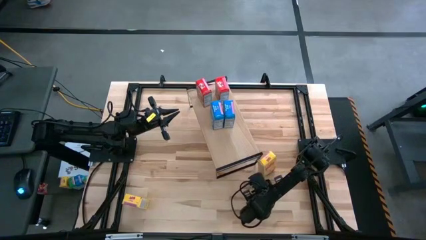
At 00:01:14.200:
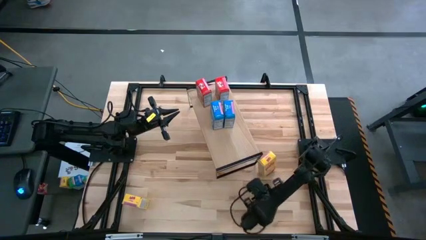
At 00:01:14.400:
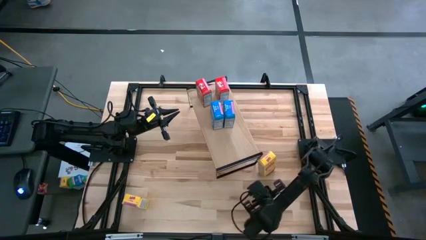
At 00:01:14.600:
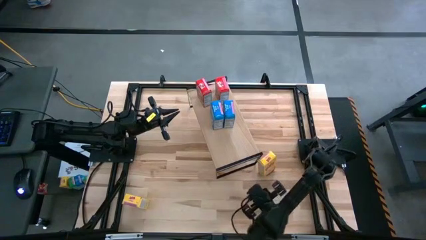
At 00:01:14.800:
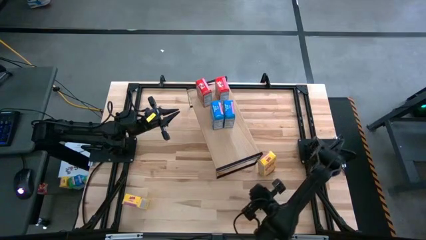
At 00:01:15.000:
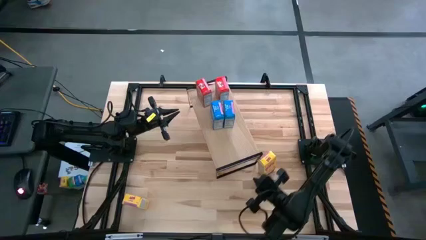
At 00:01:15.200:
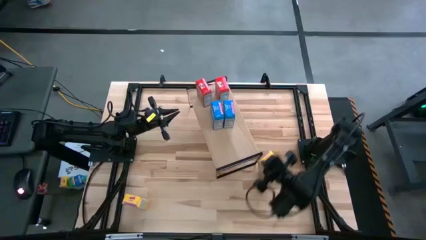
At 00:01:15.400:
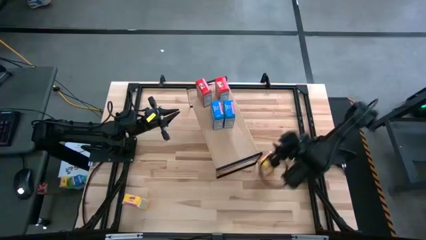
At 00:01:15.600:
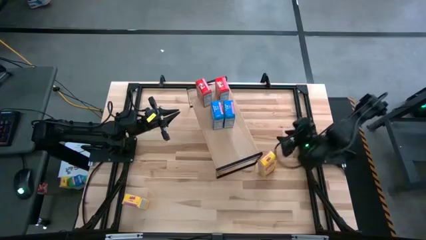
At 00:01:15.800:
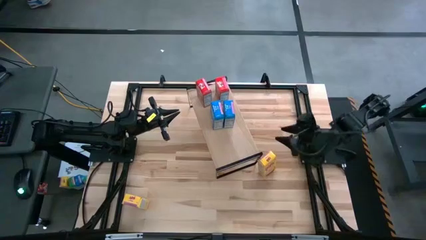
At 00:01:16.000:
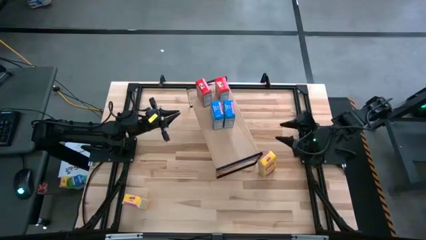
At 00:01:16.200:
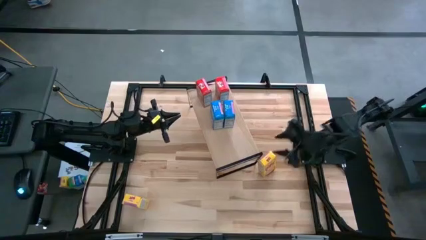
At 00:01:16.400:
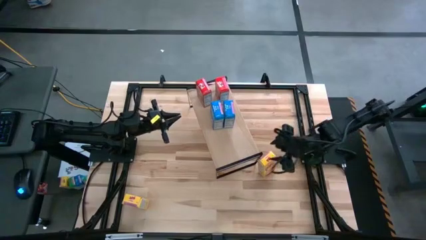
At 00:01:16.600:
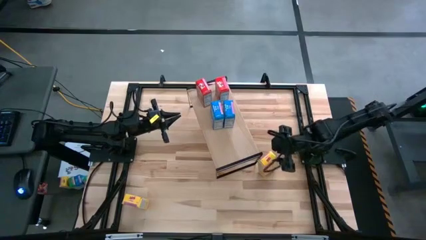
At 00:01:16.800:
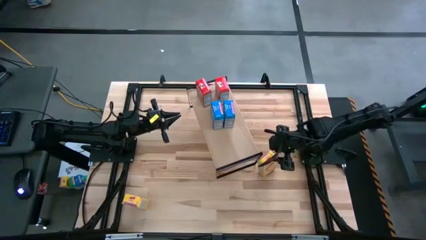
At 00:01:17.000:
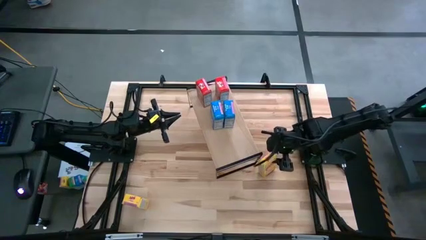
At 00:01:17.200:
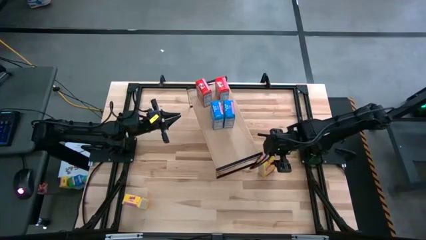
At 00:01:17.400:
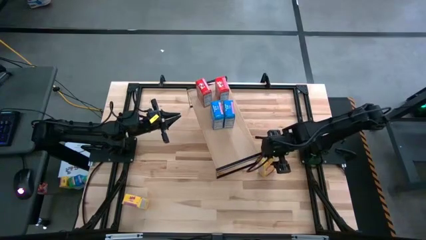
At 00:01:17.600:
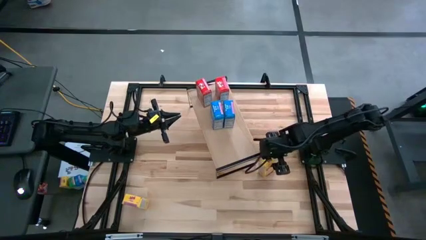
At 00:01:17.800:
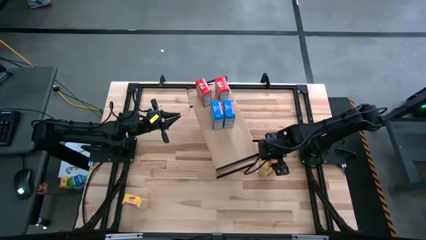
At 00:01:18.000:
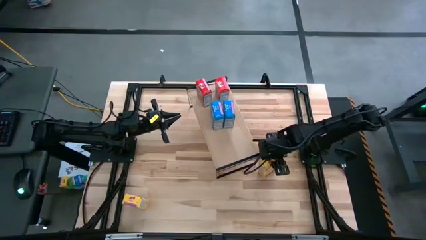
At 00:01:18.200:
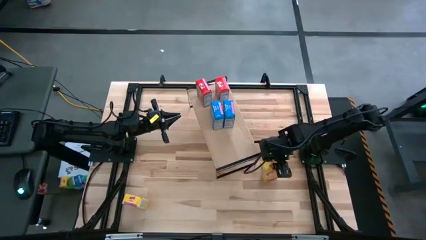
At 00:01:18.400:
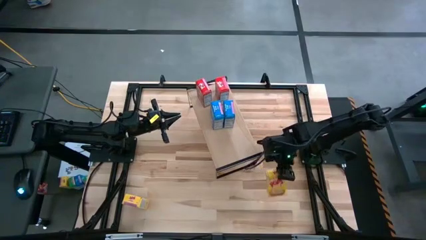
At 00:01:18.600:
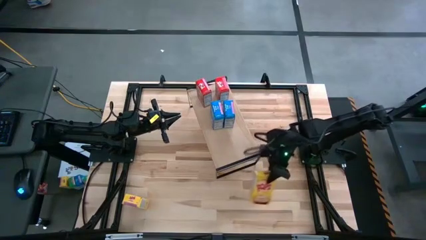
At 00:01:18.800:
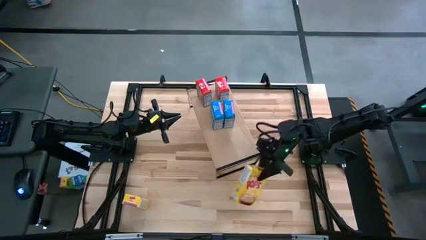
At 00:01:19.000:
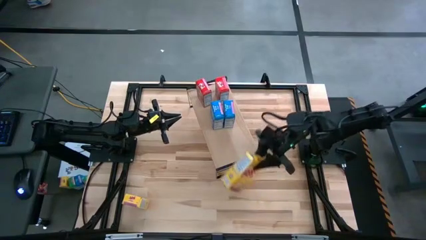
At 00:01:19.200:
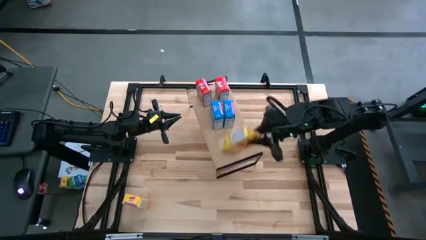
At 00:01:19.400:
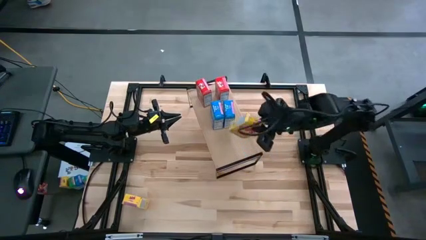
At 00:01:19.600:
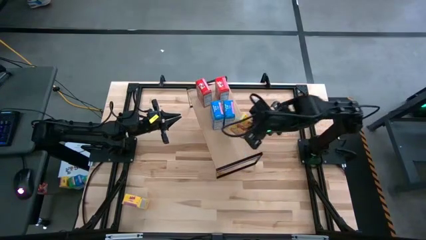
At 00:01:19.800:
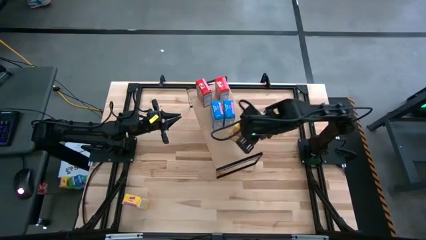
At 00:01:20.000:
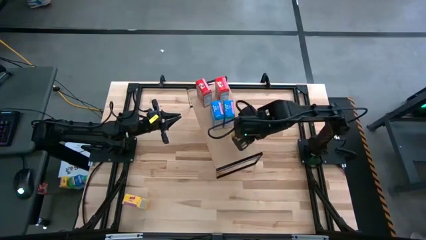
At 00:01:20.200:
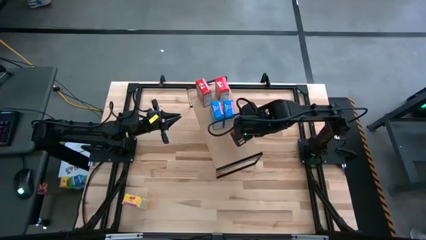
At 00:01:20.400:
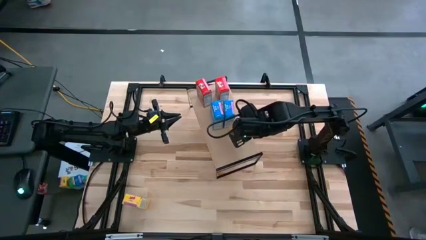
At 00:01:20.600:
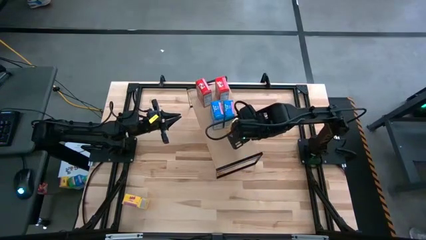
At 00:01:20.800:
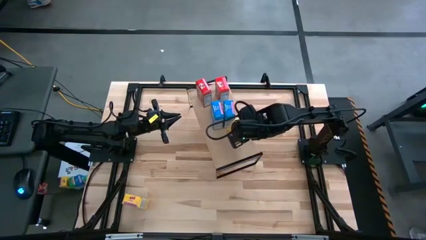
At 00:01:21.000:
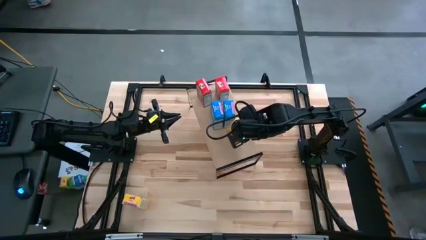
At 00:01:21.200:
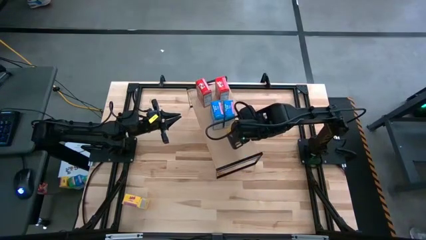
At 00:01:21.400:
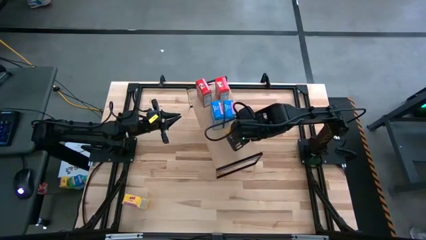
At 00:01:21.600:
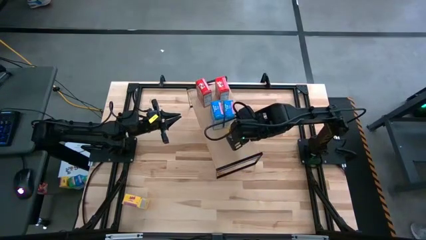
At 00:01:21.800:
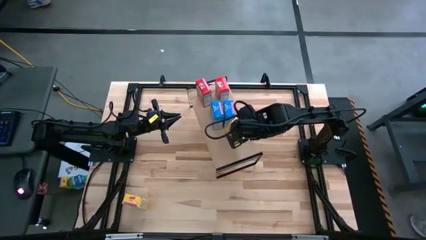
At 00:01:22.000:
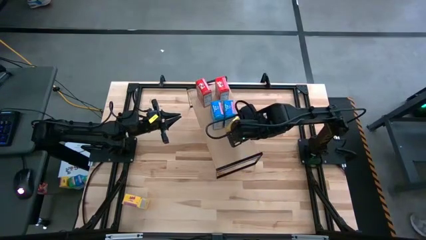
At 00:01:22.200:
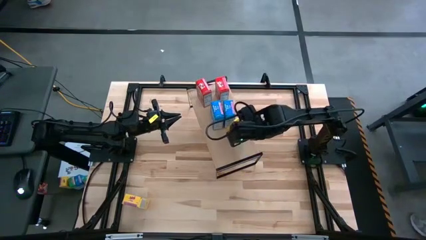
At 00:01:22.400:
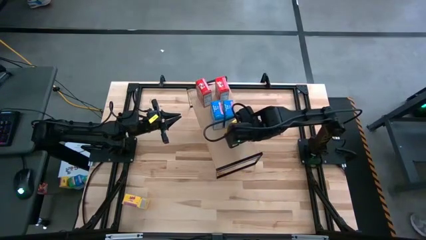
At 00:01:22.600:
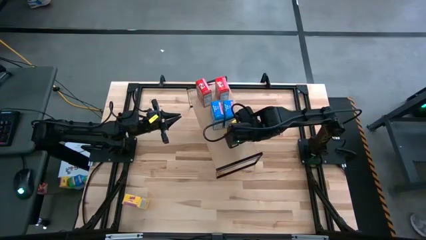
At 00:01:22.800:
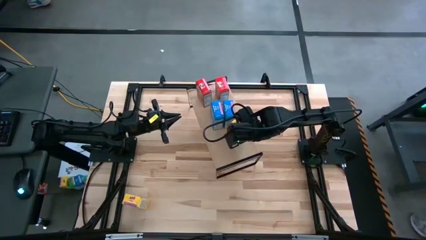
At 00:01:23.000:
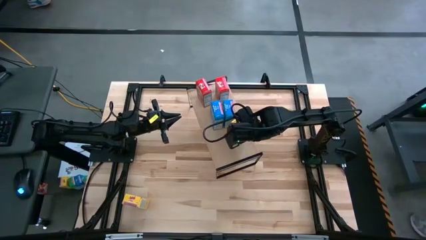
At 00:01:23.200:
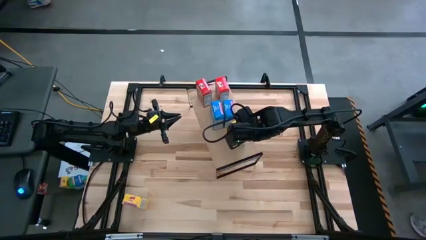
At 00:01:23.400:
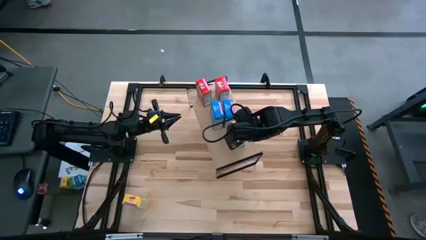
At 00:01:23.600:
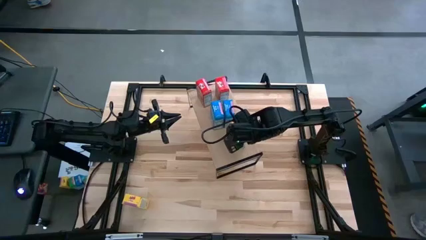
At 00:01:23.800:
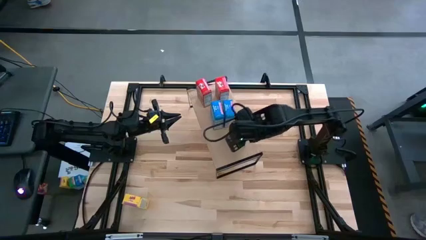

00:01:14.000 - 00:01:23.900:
Task: Stack cereal on shelf
Put the right yellow cereal box on the shelf
